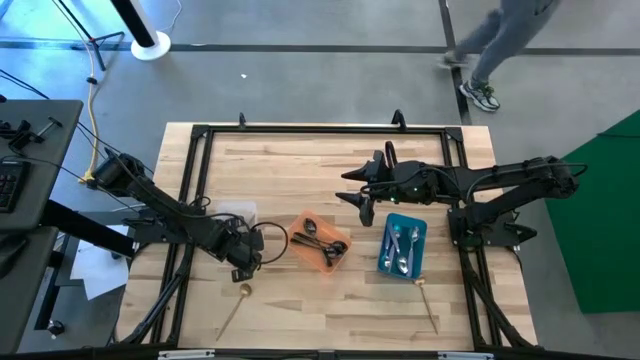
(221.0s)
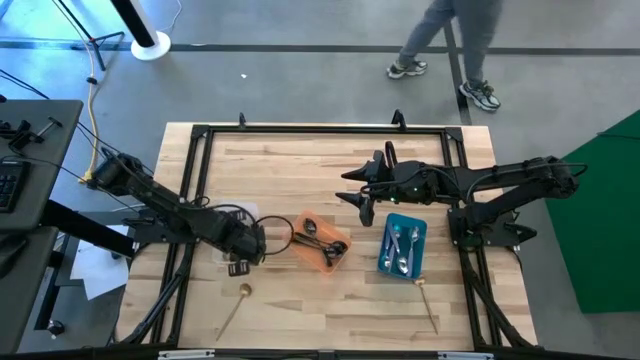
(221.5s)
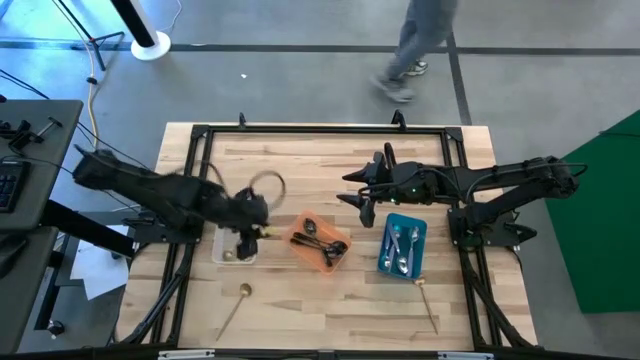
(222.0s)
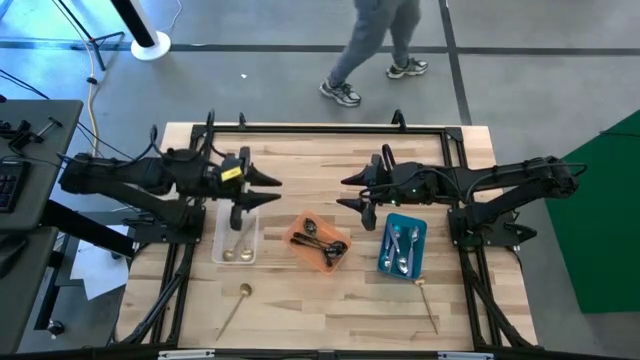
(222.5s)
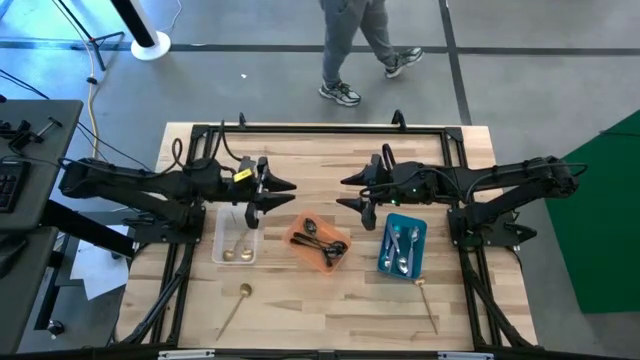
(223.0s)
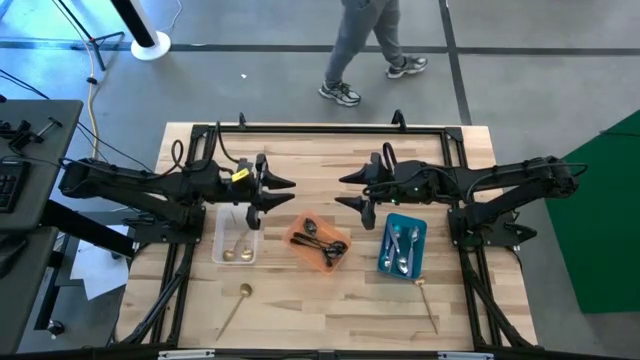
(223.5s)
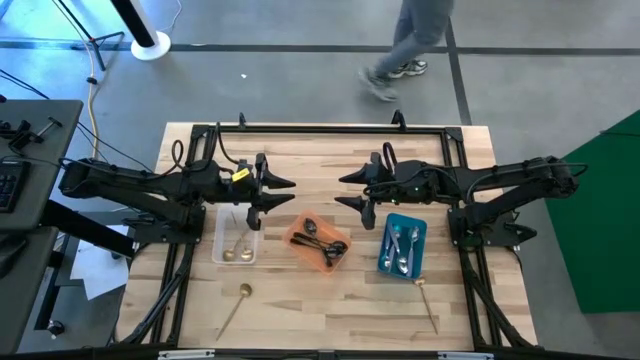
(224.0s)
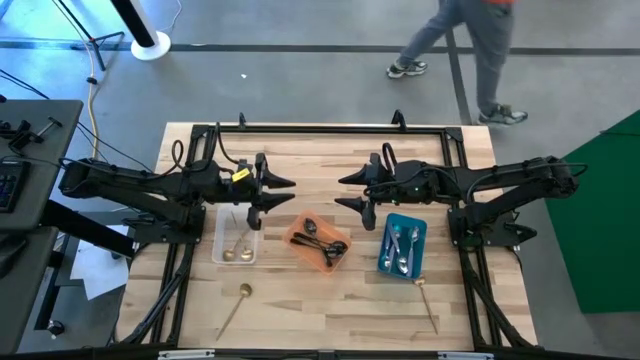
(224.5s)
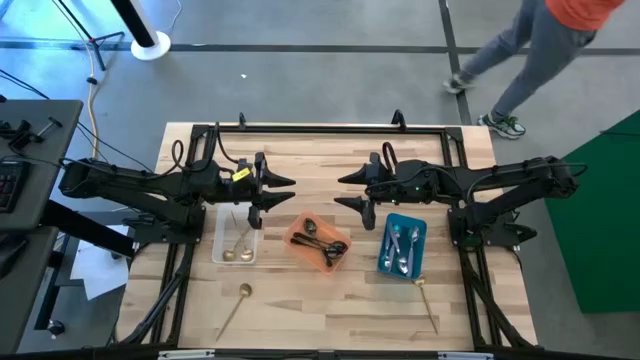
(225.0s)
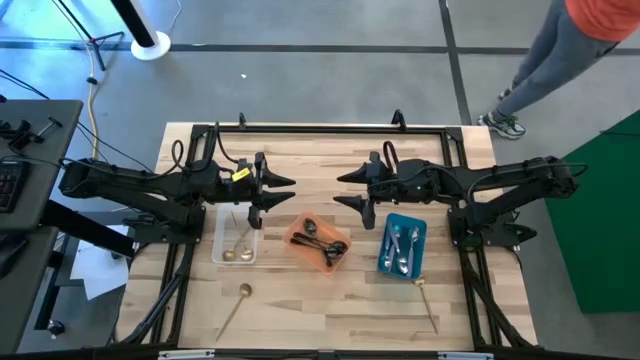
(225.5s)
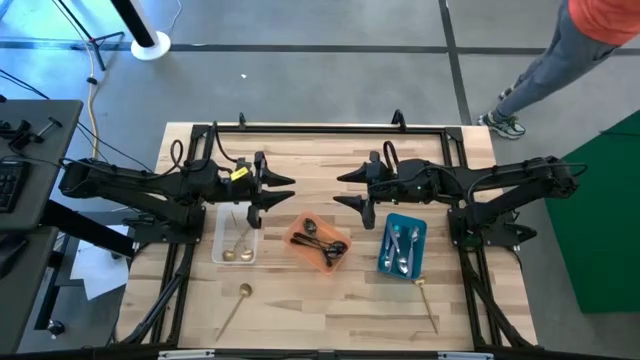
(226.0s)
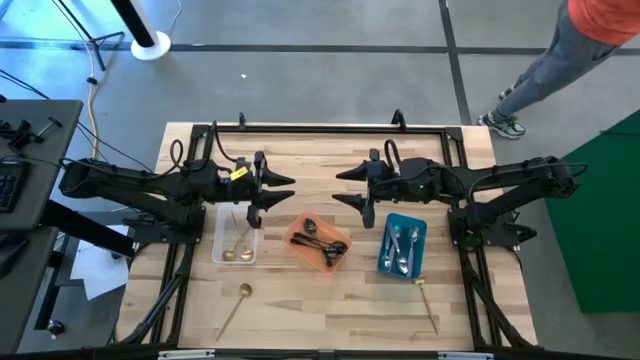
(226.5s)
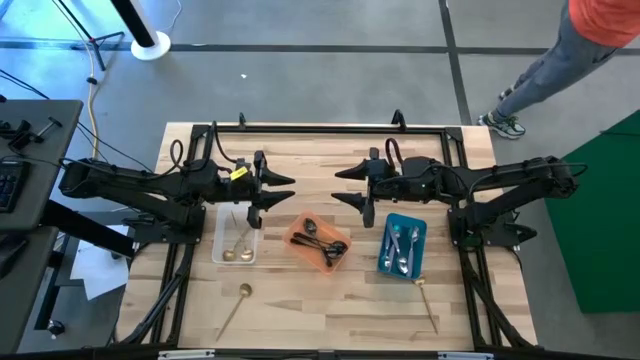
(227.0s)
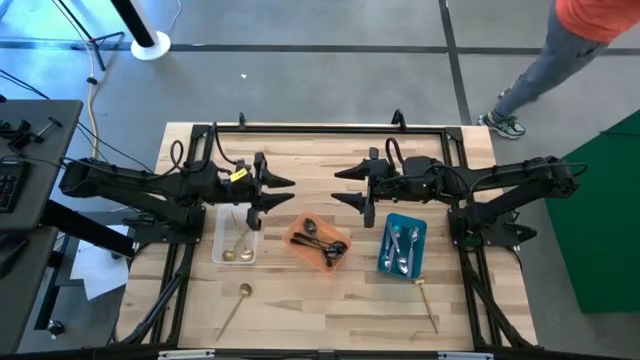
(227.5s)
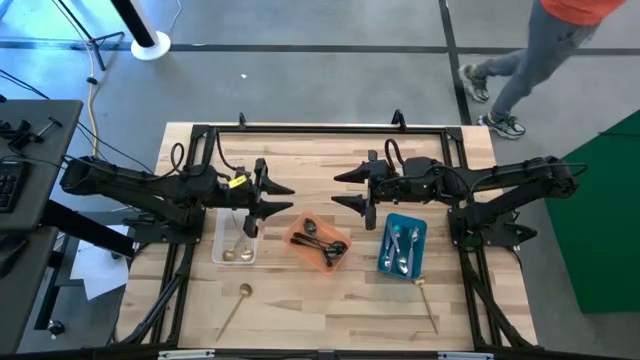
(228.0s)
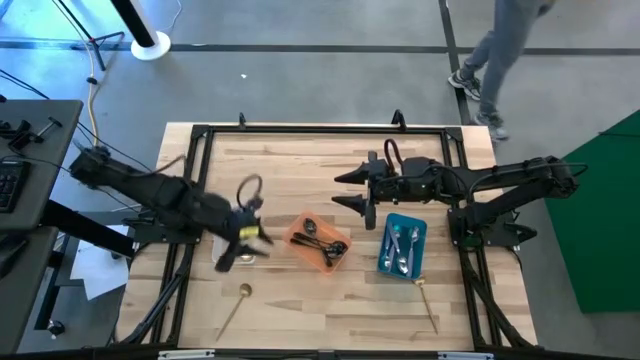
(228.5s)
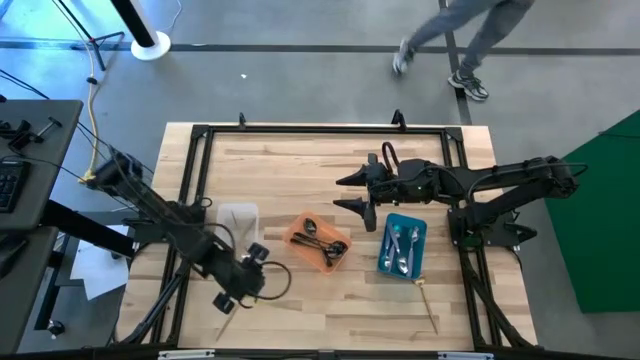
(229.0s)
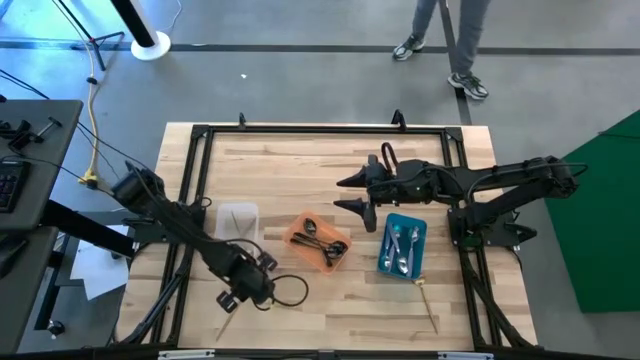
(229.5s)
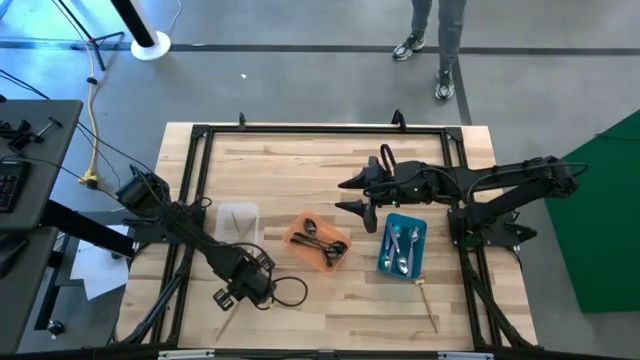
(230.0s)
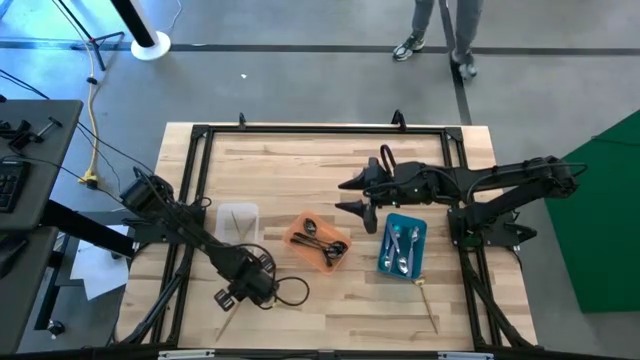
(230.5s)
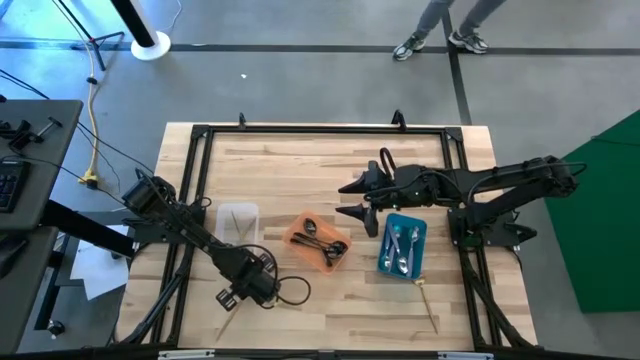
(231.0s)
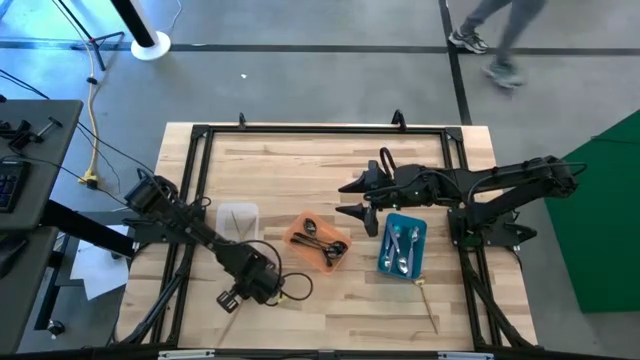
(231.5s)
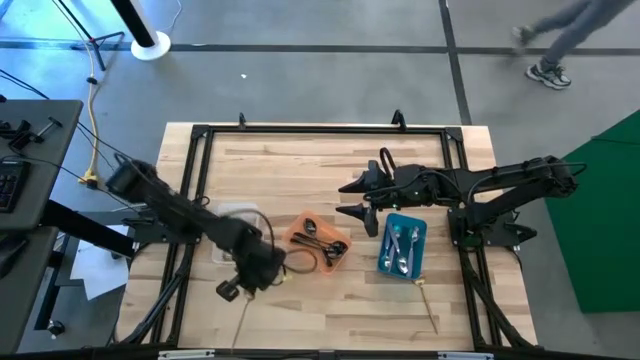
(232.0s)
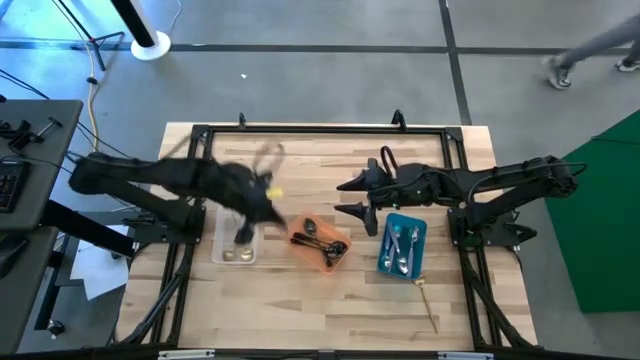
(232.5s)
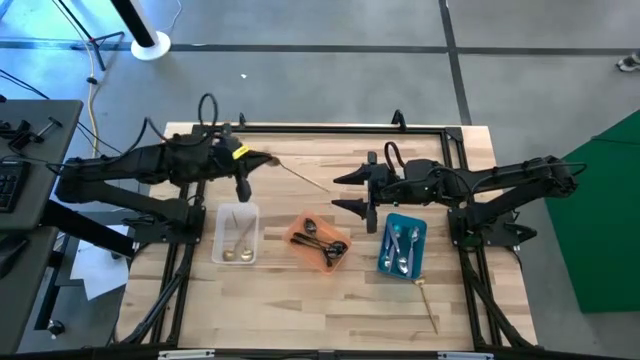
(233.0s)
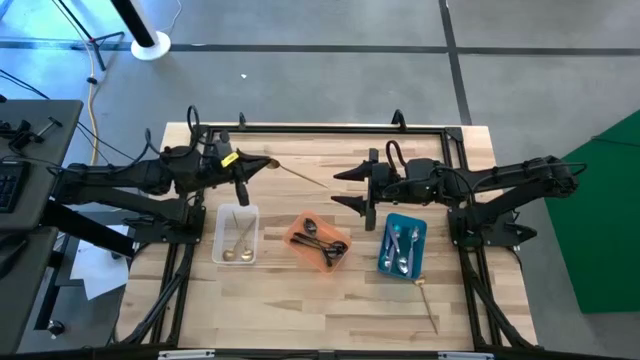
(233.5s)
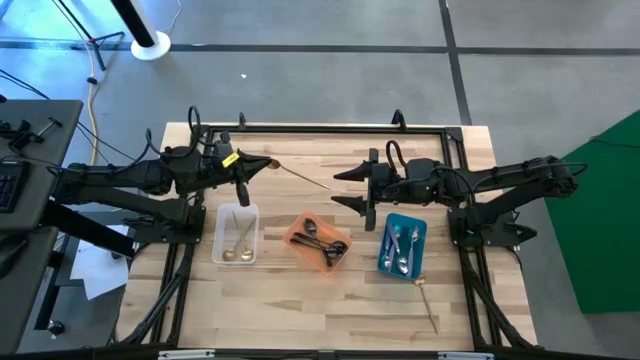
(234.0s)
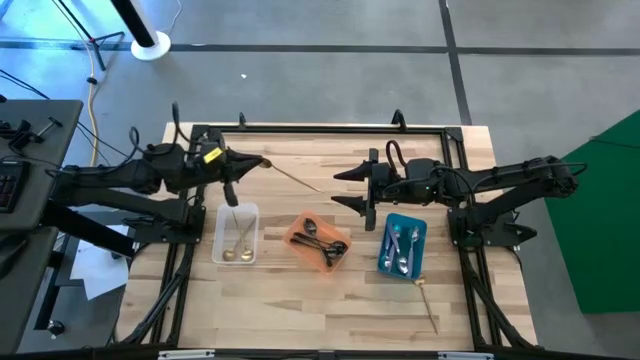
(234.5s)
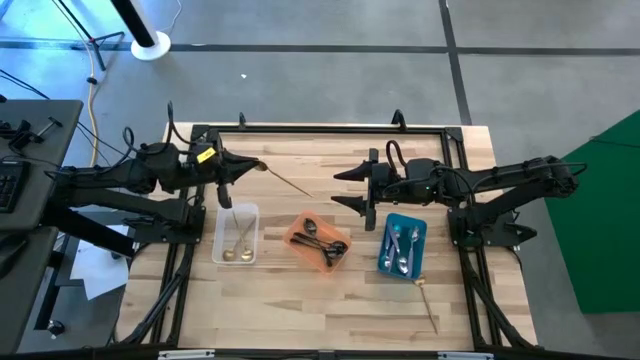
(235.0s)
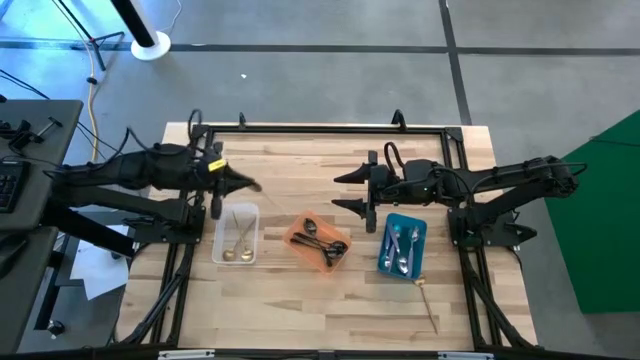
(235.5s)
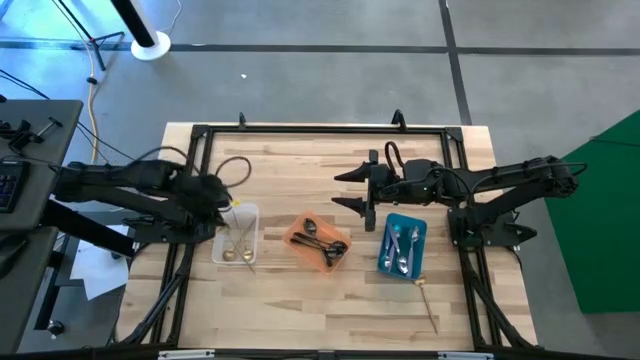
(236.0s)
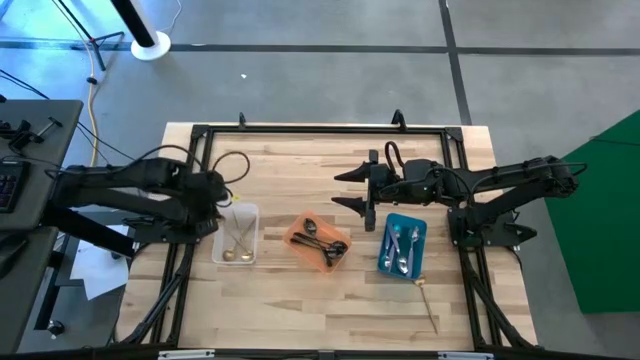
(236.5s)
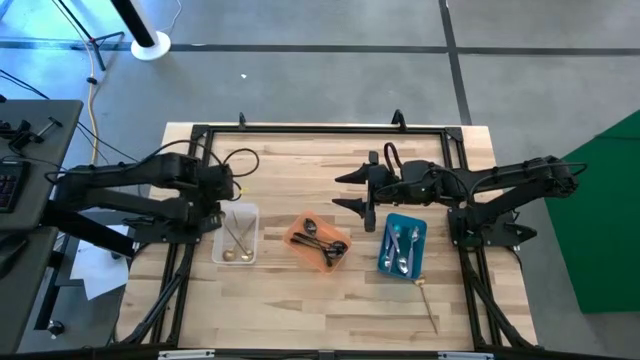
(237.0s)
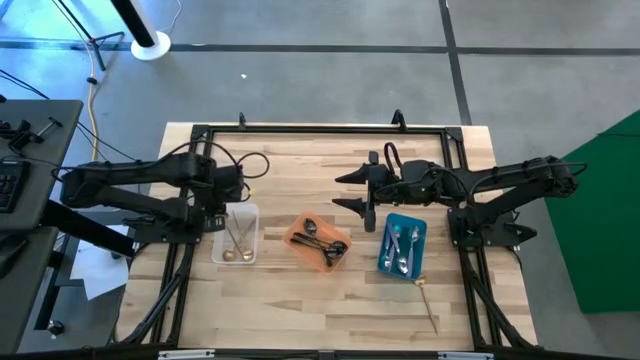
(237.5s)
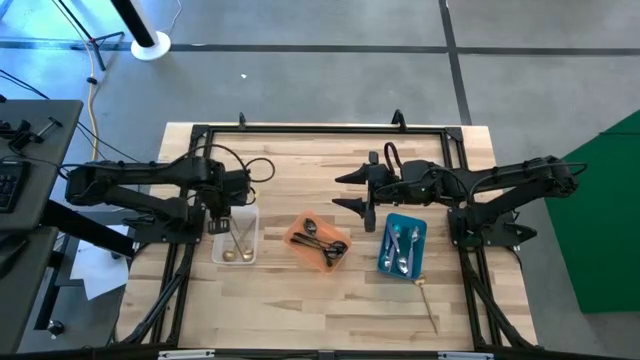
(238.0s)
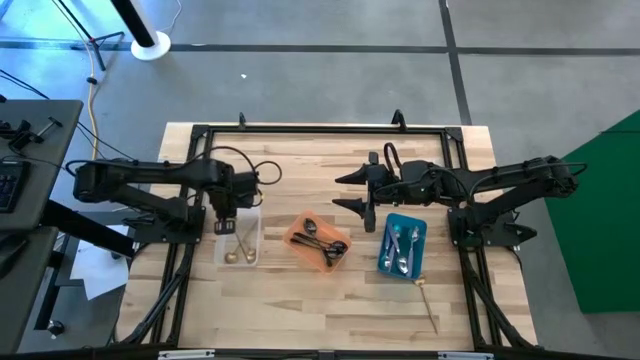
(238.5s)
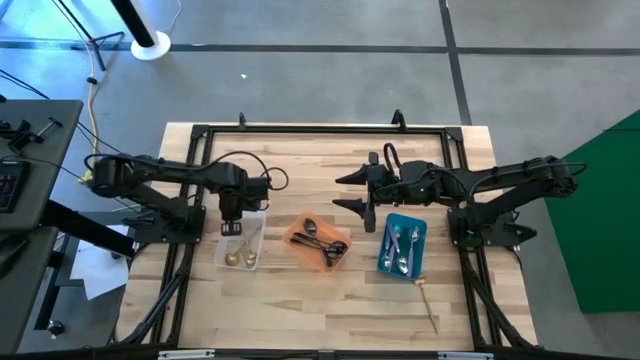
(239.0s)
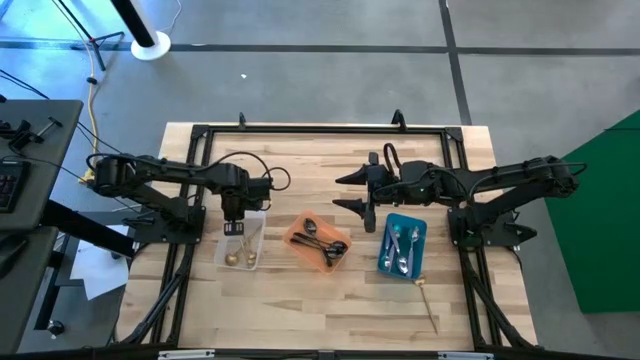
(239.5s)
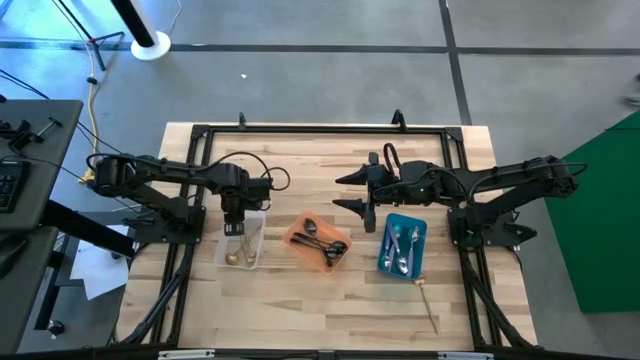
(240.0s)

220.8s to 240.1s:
Task: Sort silverware by color (type)
Put the left gold spoon into the transparent bin
